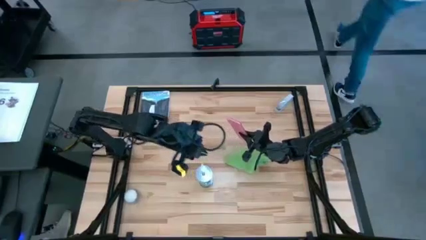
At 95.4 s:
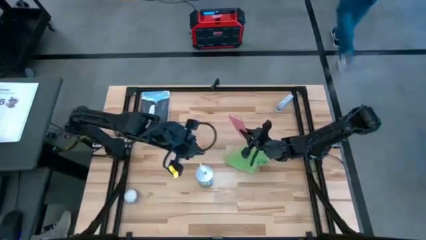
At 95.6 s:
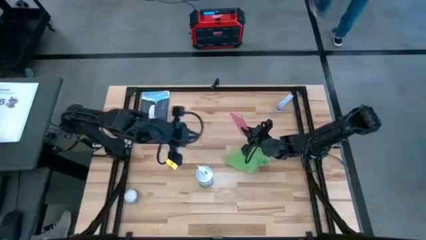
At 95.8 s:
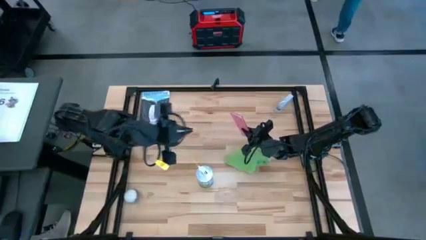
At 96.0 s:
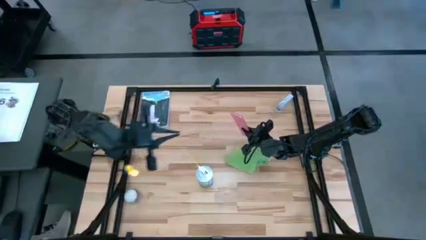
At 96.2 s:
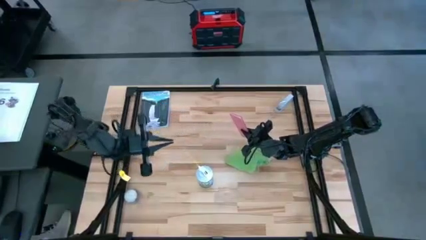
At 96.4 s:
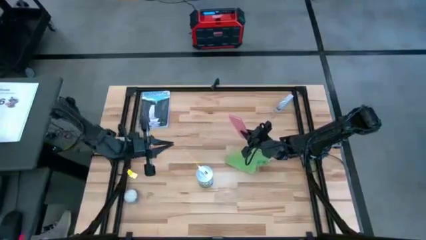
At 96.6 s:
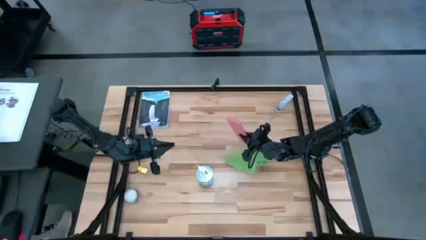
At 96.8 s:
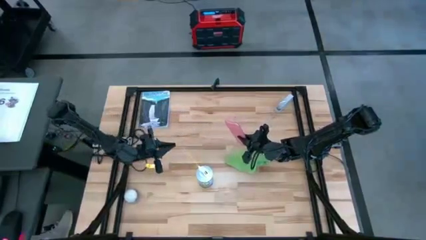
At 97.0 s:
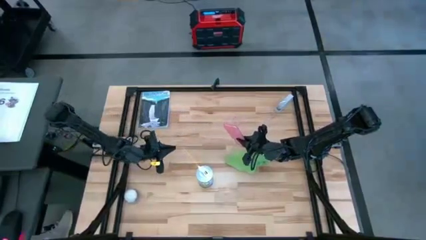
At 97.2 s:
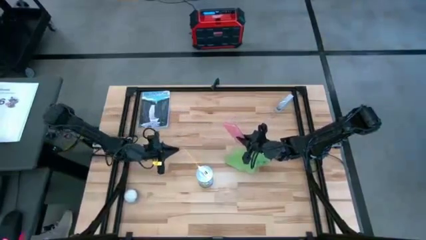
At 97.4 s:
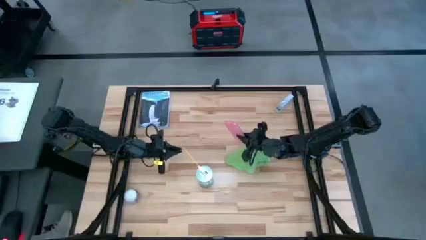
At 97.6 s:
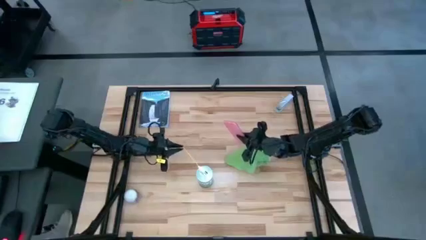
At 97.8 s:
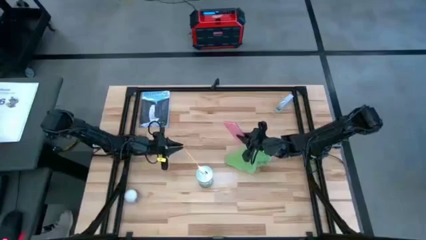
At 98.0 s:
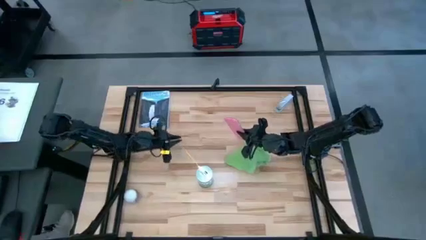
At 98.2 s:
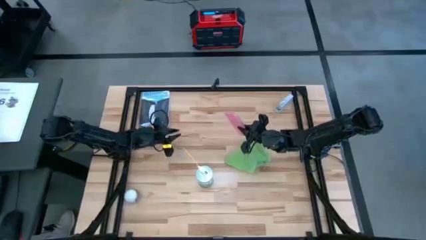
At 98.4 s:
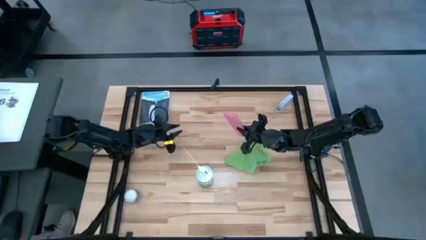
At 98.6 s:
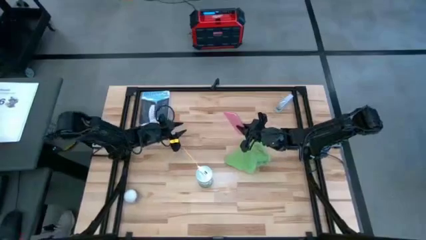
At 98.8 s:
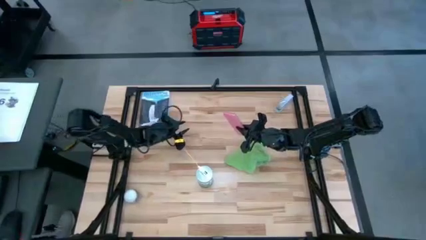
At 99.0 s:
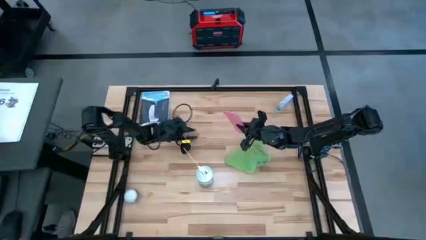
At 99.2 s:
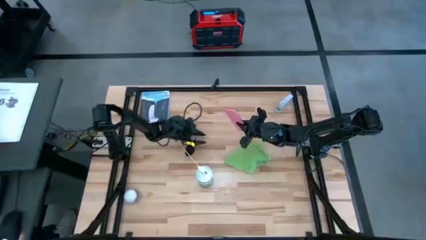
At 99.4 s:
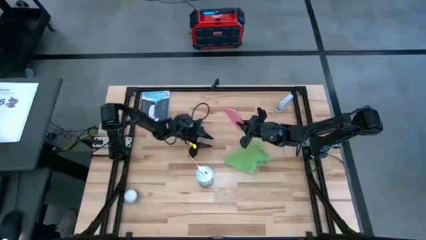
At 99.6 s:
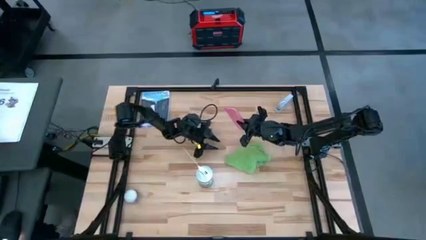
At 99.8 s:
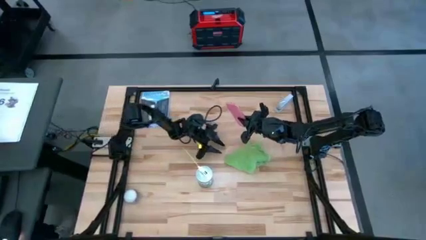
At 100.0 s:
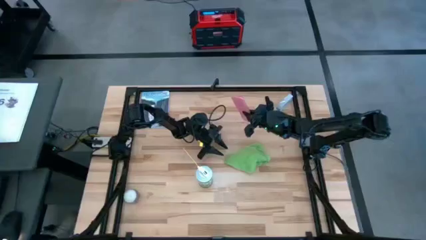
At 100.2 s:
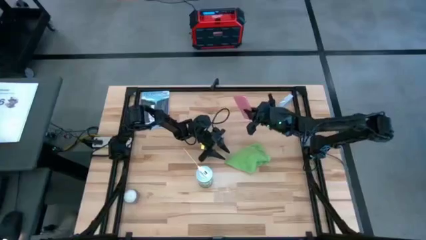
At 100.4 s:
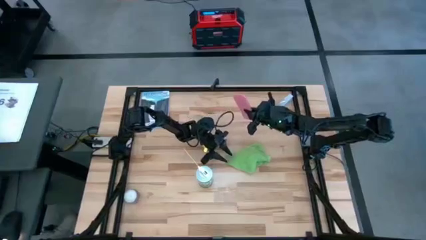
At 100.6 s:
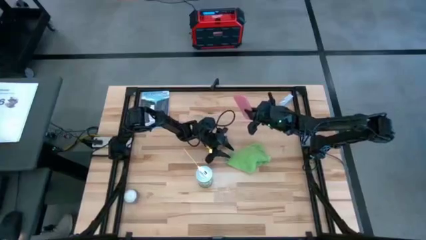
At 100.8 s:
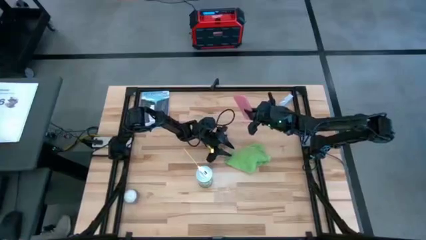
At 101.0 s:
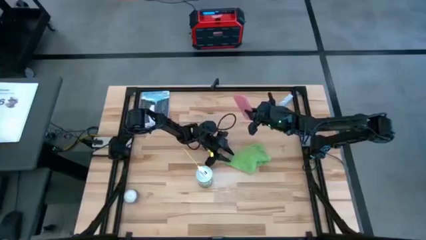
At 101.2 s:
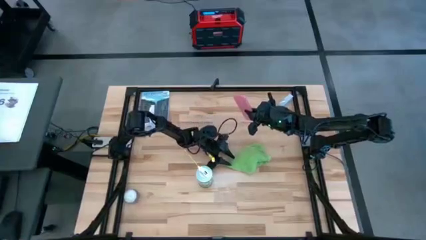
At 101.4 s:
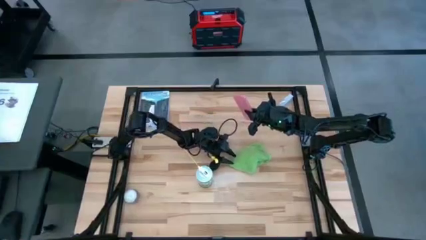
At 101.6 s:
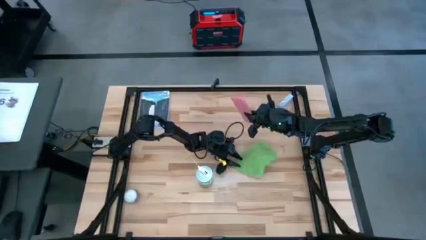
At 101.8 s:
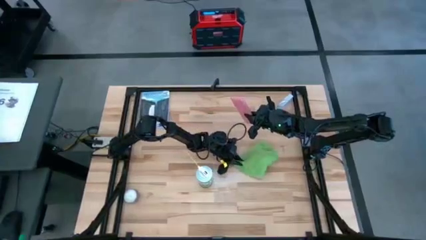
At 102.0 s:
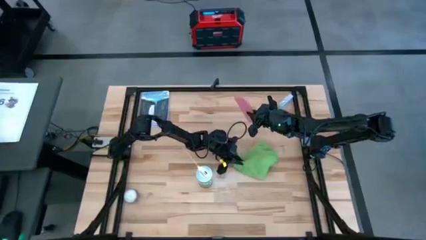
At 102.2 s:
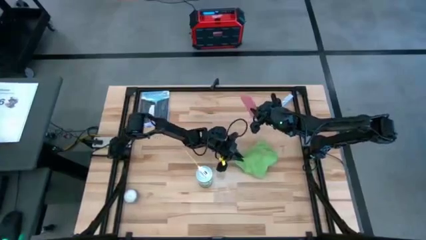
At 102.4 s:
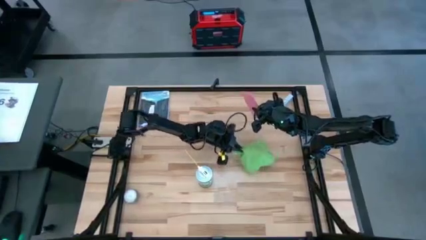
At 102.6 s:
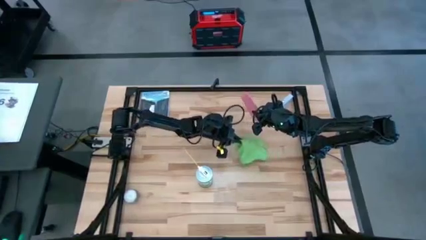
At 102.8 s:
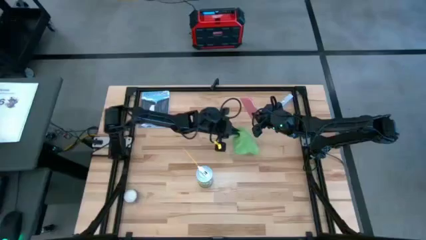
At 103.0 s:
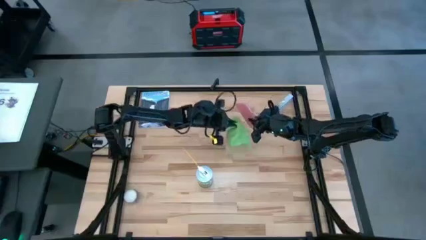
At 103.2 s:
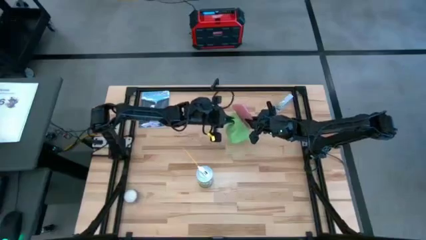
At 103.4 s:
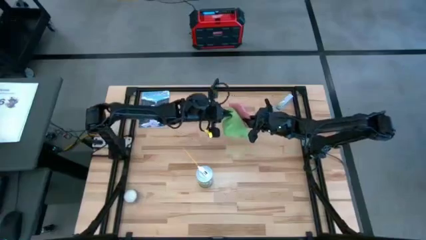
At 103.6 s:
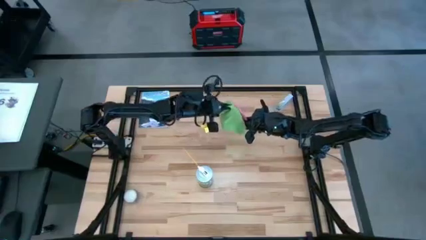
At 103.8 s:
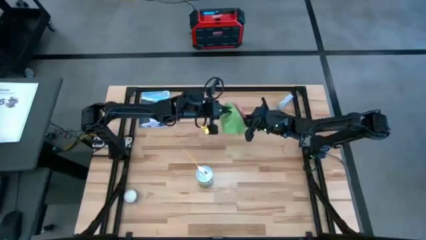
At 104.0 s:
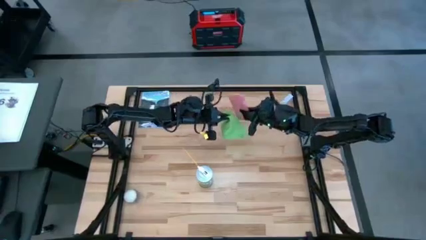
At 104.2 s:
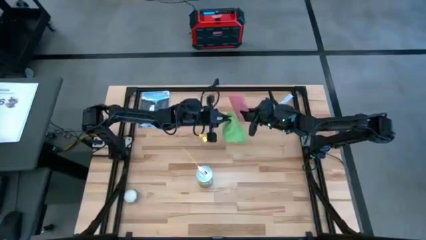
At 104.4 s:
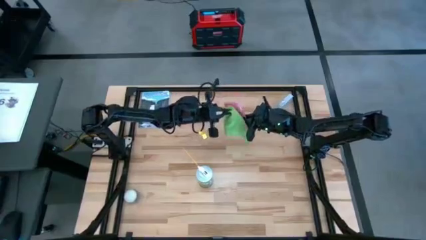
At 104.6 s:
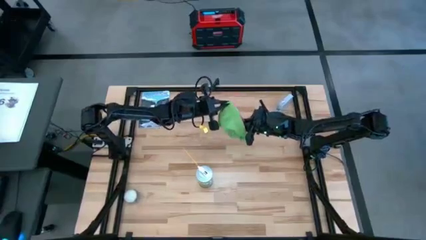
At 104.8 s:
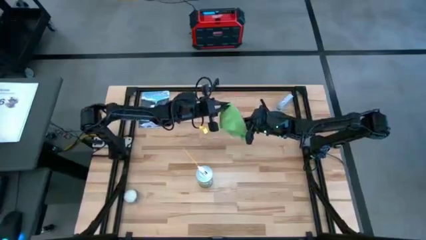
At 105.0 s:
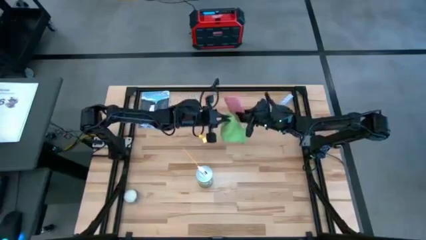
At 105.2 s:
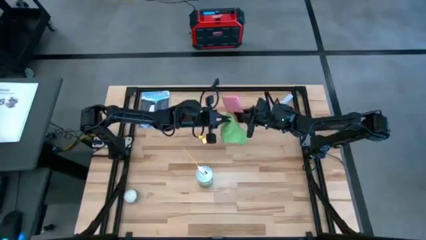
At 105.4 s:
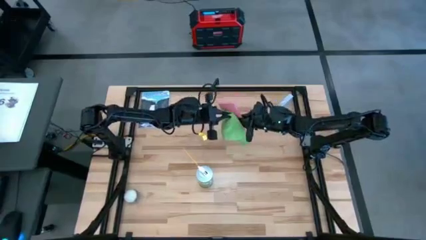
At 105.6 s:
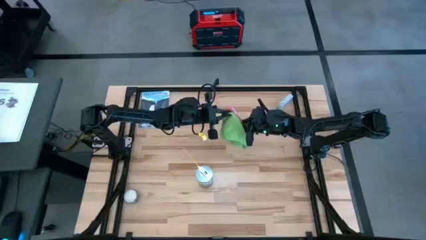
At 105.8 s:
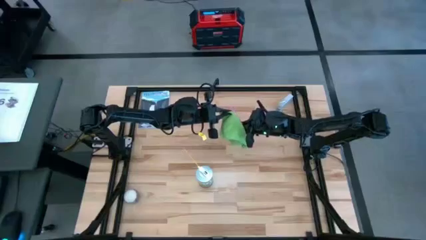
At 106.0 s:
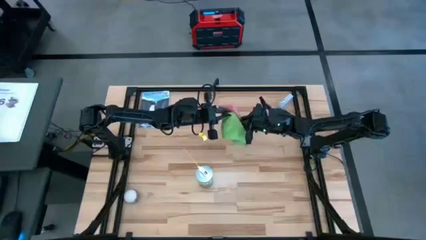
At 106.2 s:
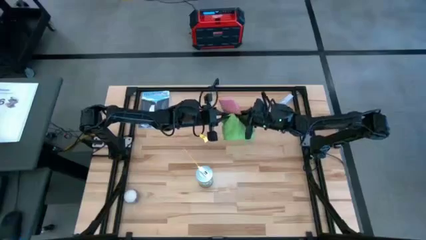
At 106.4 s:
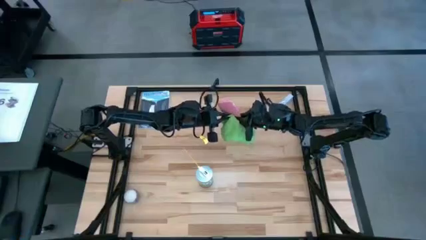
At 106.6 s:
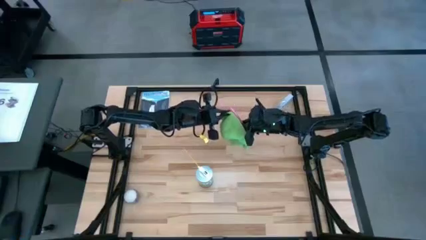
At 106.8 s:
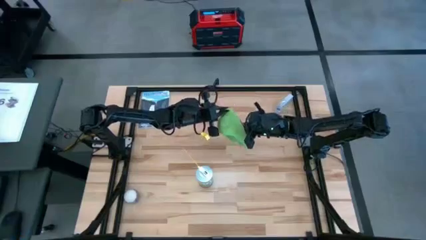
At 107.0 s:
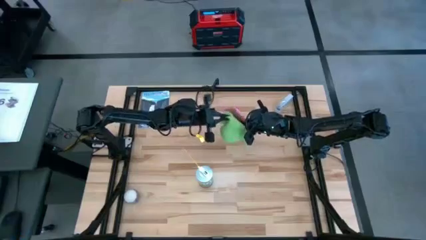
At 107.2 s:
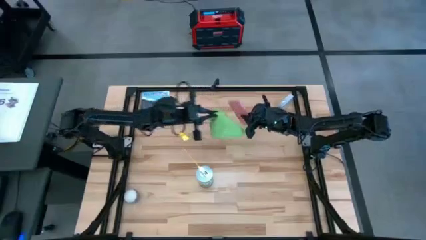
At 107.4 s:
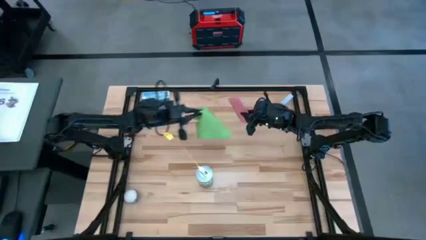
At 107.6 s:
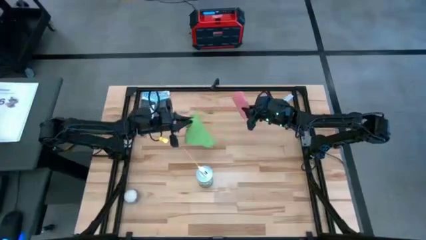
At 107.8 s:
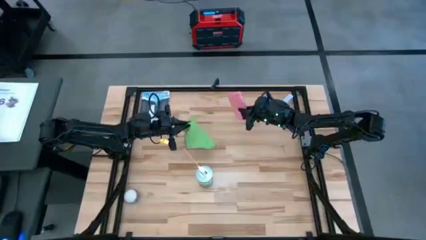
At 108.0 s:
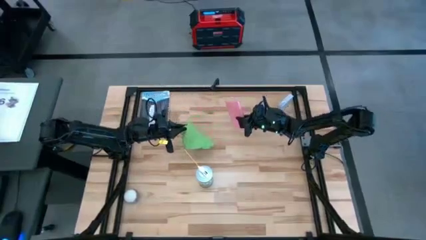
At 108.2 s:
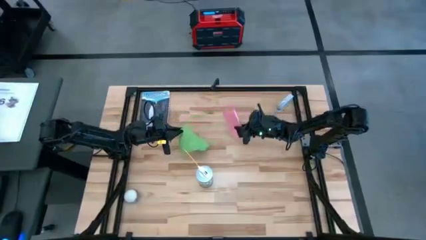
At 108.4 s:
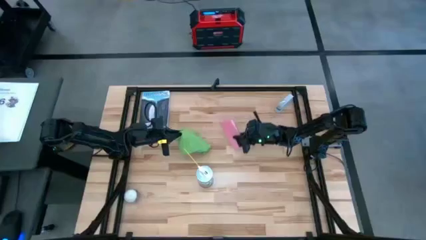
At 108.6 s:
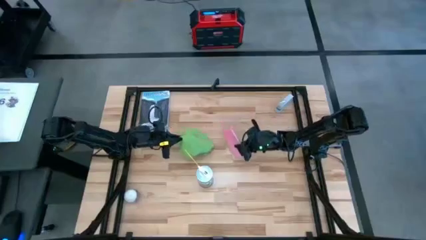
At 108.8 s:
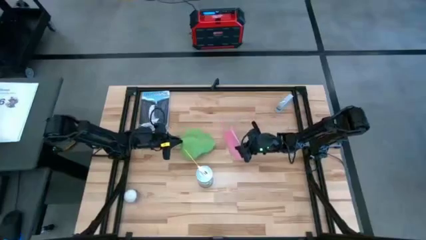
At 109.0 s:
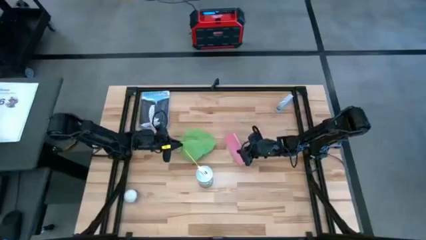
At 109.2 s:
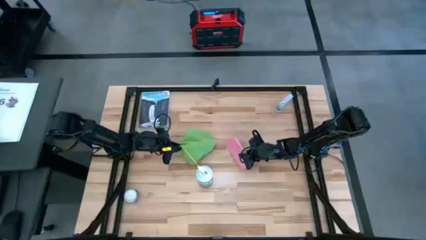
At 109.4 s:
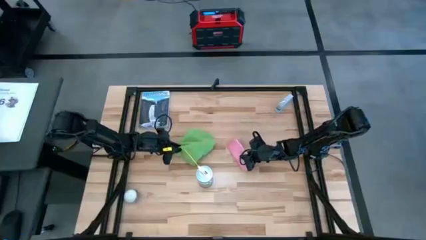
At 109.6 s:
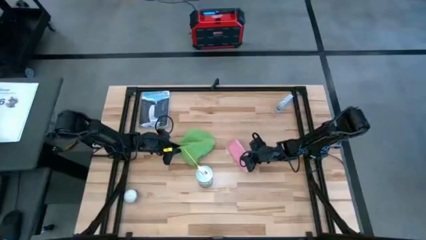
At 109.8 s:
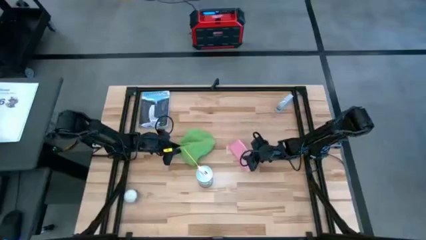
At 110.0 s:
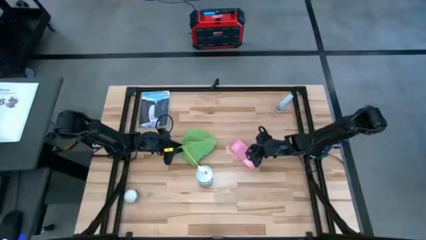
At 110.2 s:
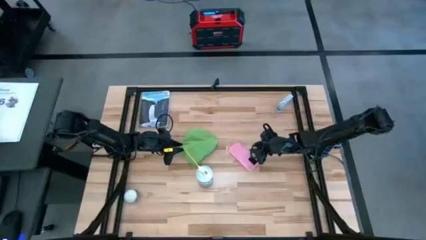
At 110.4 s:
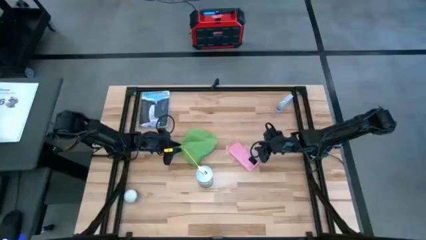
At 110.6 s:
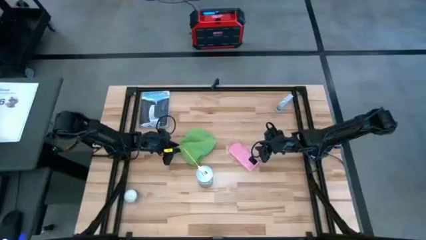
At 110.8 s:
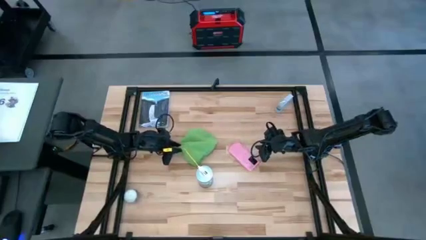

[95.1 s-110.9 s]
Task: Apply microfiber cloth
Wipe the back of the black cellphone with the green microfiber cloth

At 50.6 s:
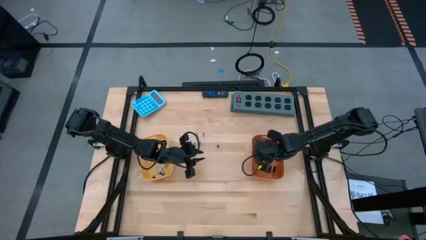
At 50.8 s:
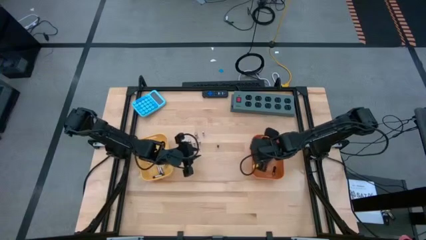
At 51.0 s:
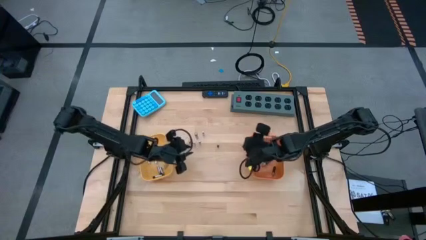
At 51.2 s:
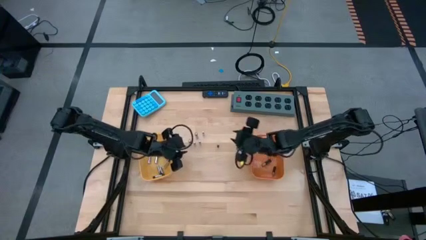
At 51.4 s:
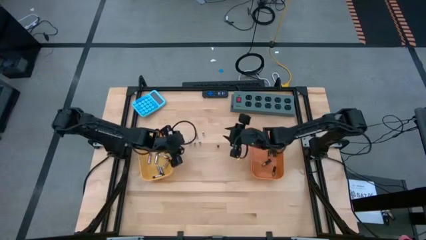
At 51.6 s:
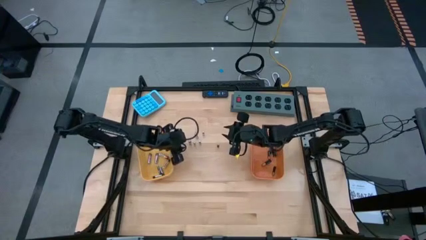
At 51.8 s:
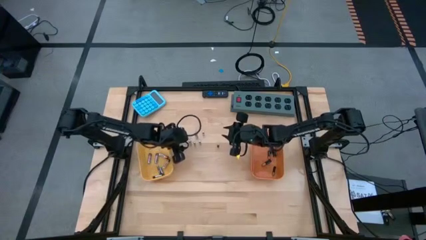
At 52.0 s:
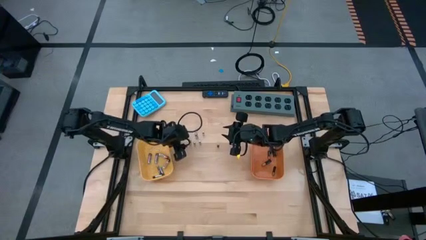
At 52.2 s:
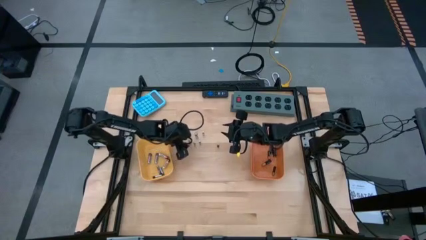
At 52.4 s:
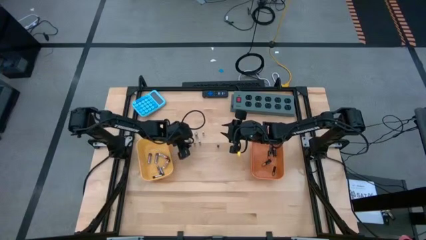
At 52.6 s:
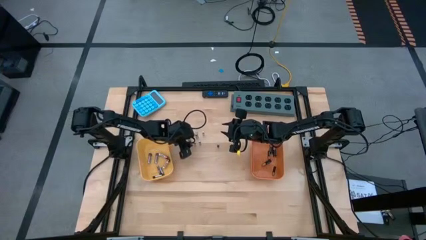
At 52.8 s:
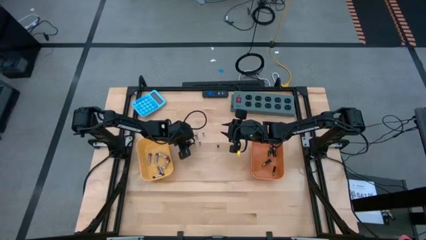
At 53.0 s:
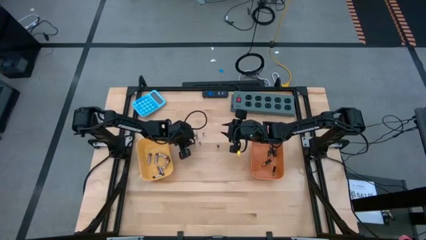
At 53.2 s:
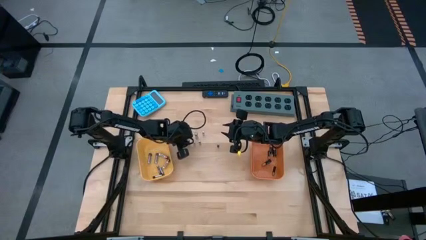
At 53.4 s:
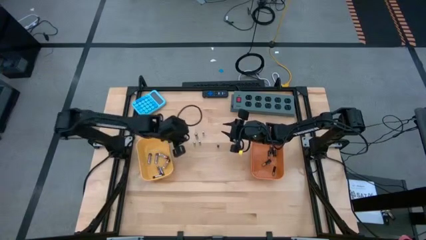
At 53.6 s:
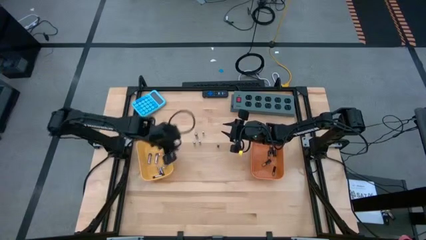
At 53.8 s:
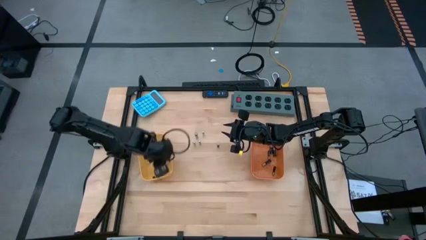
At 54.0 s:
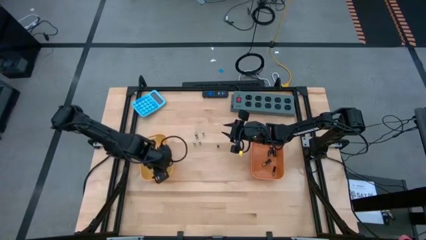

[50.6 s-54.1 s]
Task: Sort batteries
Put the silver battery into the yellow bin
